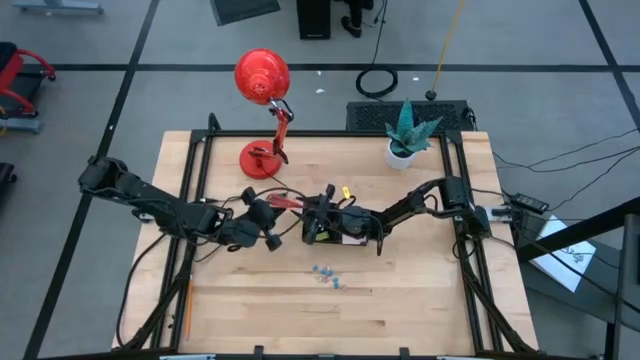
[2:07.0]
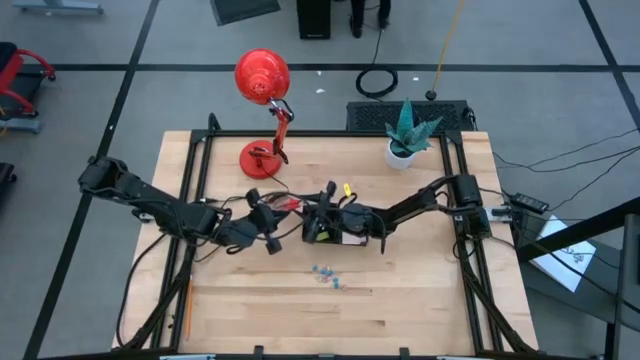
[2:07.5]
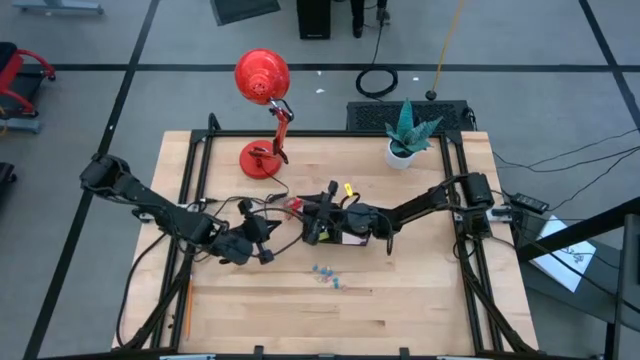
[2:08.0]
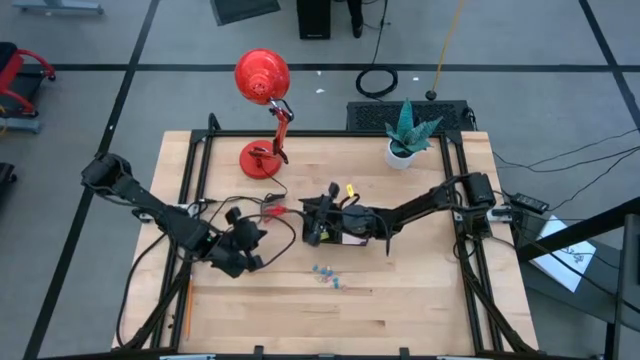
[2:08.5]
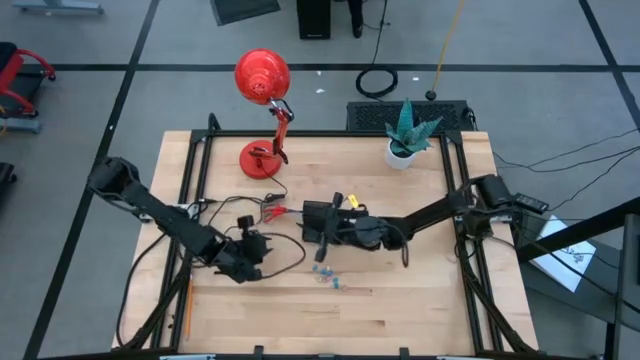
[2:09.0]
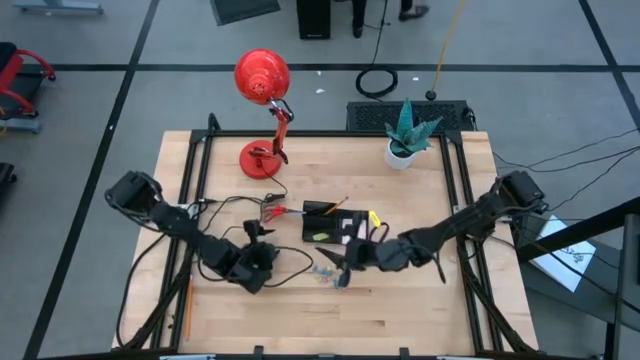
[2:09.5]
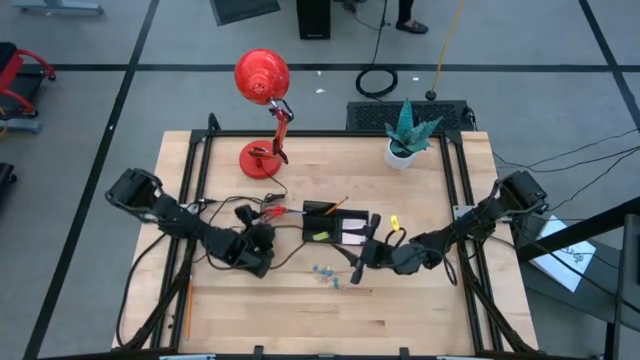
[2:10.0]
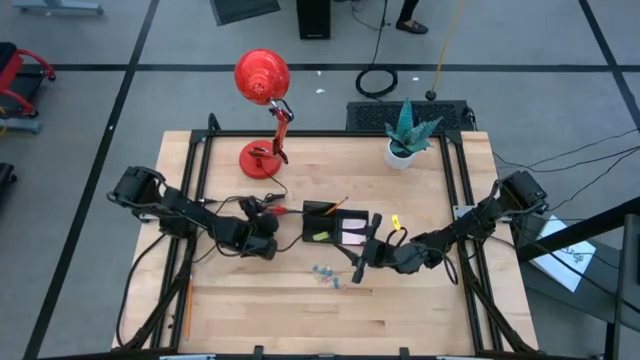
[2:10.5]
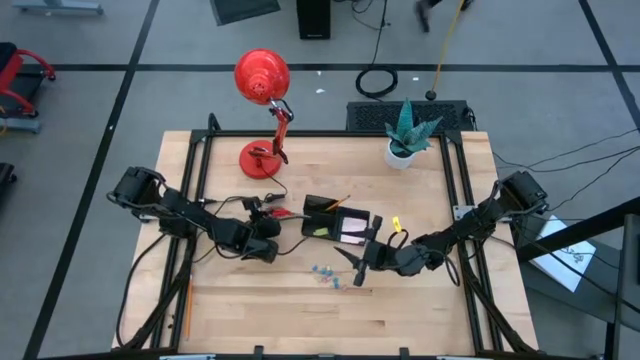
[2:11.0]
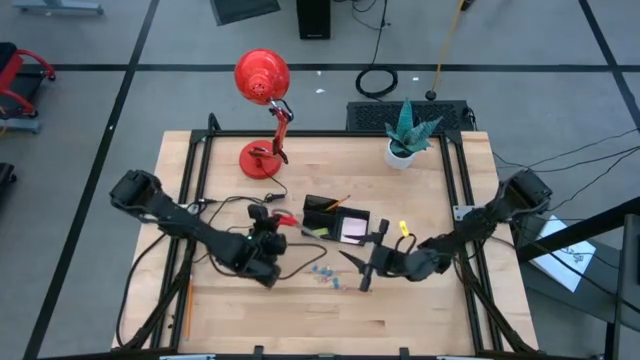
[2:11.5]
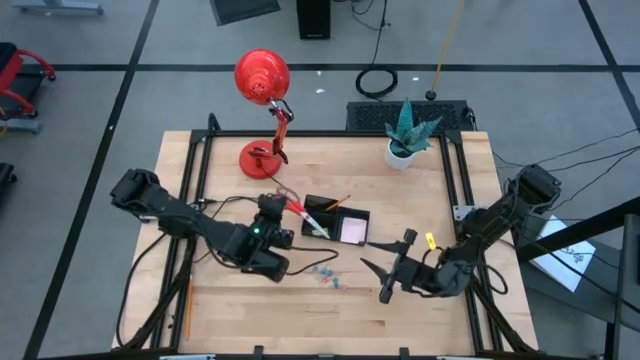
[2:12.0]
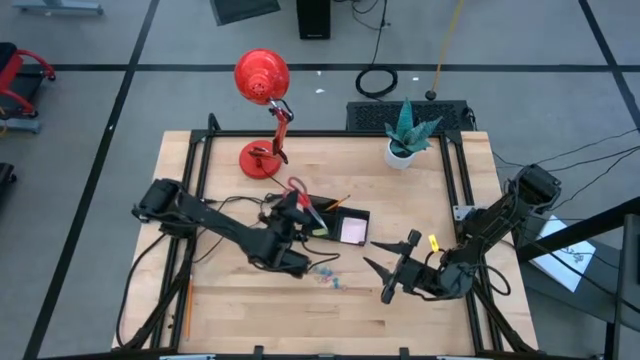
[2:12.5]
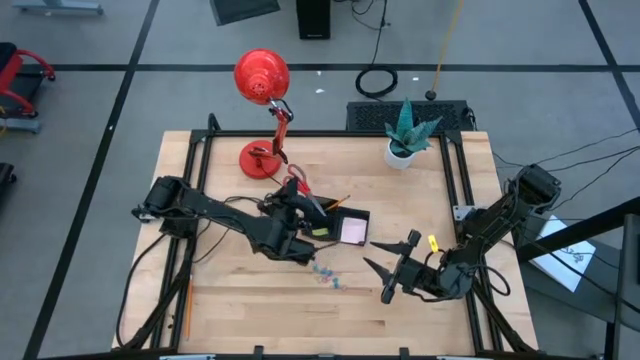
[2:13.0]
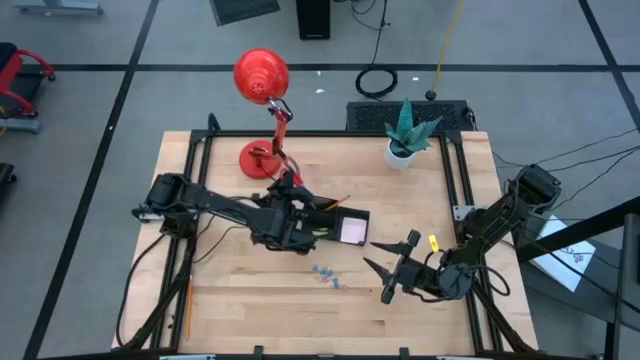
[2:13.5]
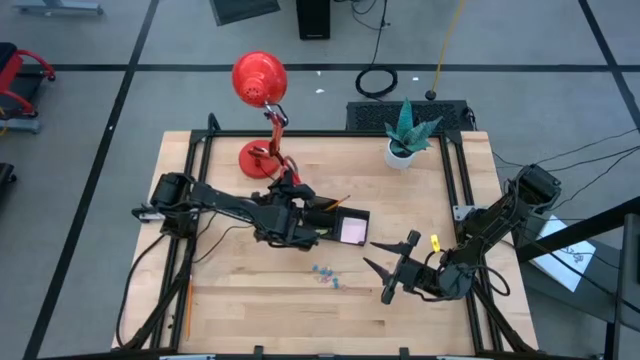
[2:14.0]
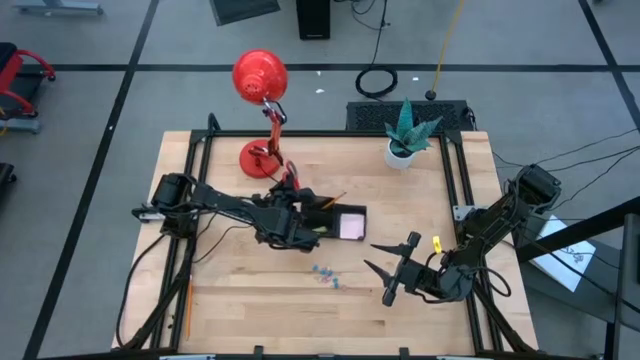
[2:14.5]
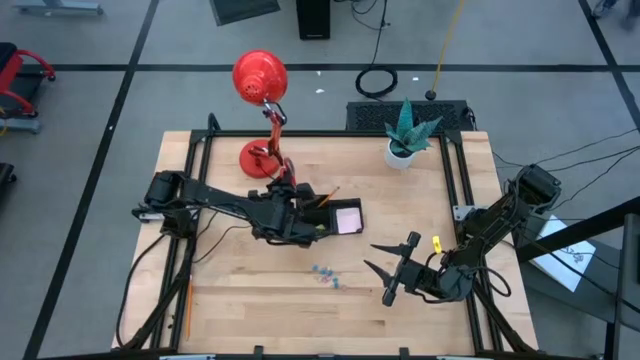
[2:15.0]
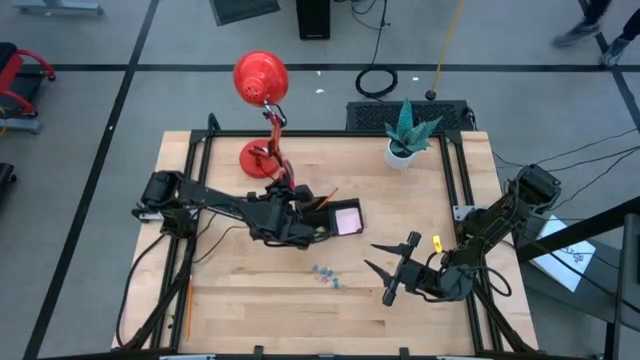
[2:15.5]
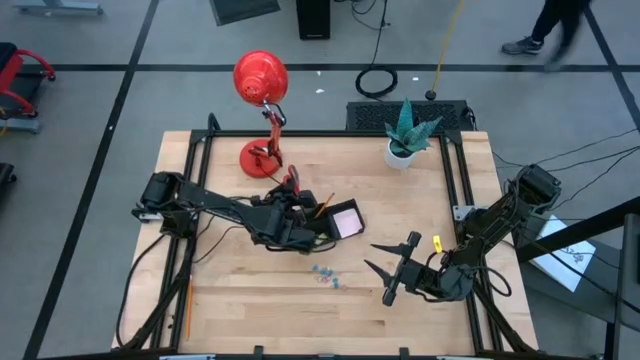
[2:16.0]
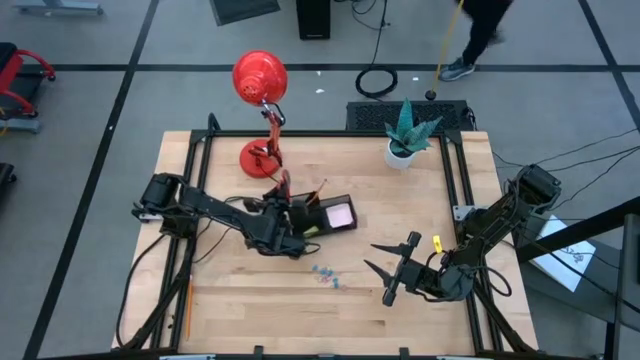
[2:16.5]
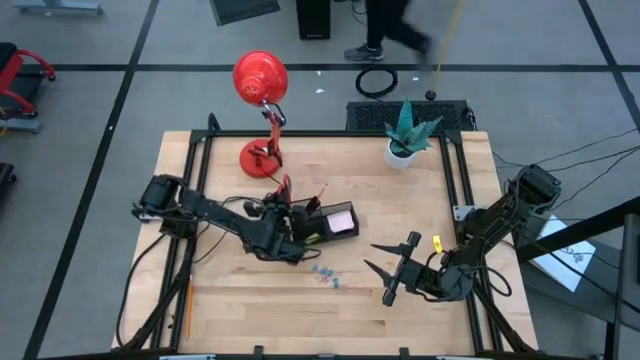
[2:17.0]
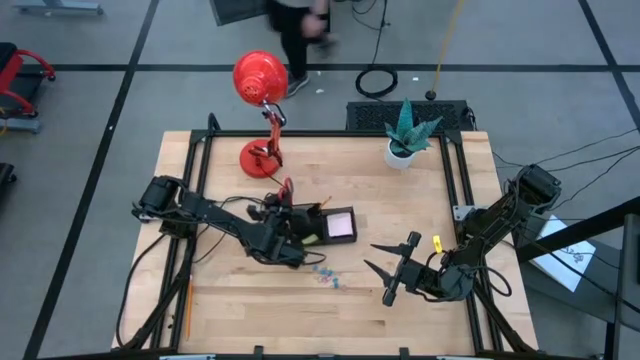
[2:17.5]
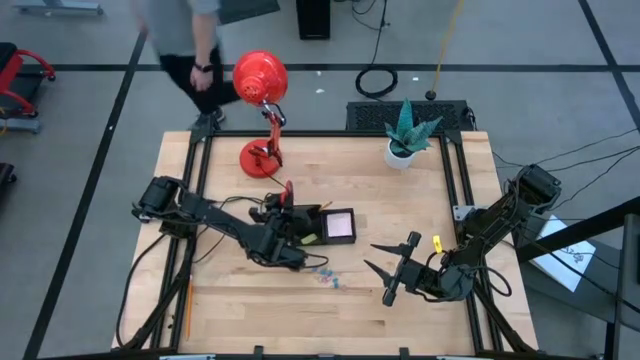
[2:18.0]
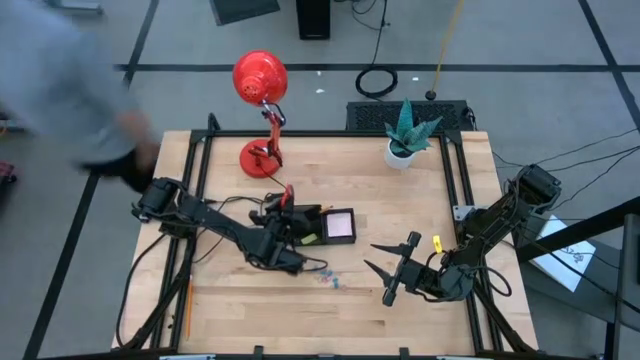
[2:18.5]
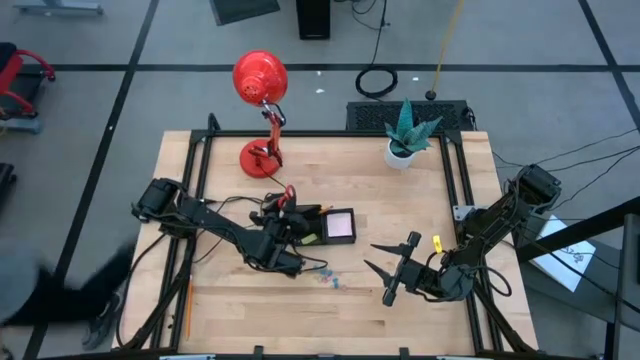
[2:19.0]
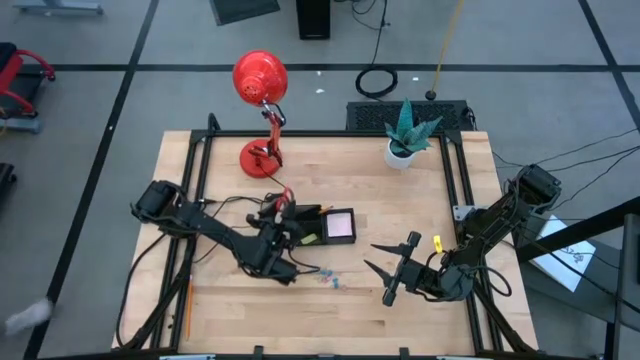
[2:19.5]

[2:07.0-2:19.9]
Task: Pick and place office supplies into organizer
Put the red scissors into the black desk organizer

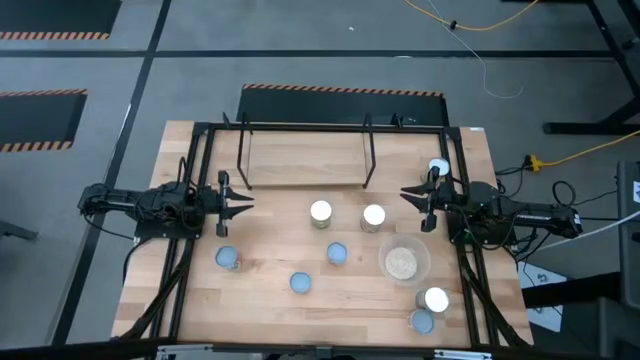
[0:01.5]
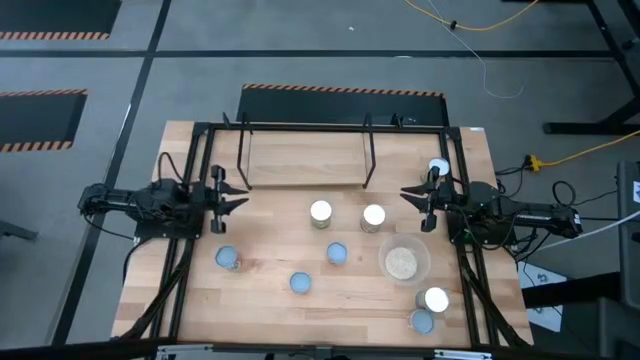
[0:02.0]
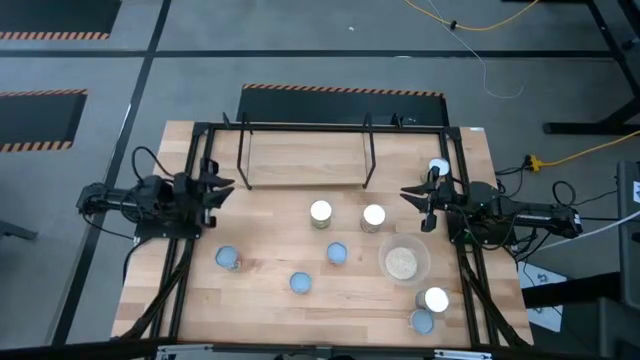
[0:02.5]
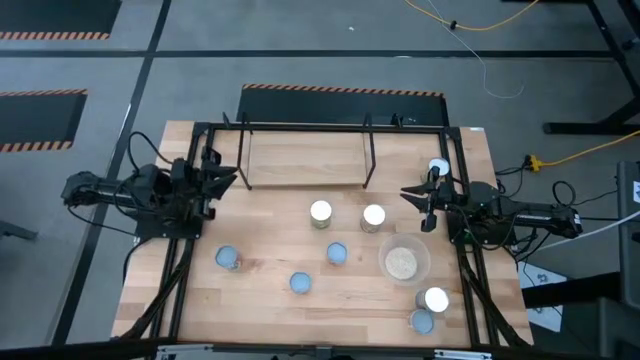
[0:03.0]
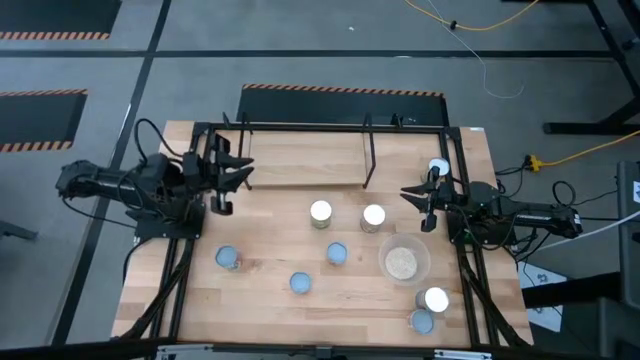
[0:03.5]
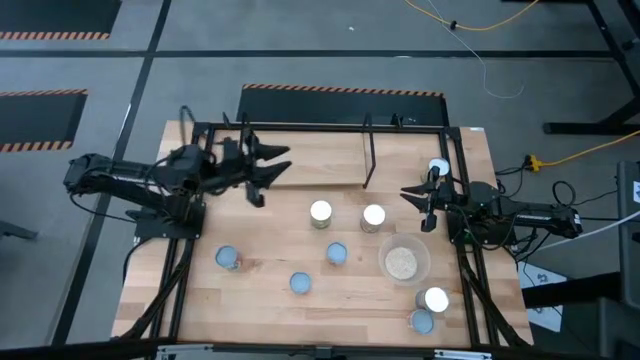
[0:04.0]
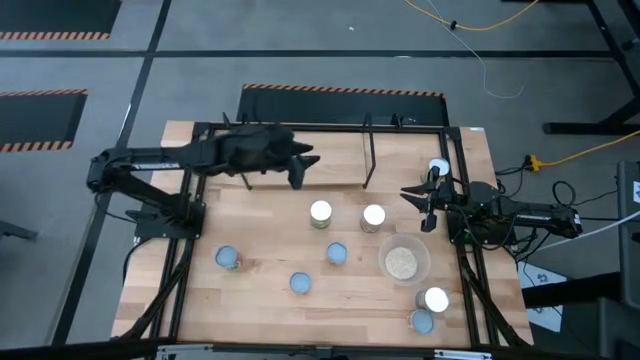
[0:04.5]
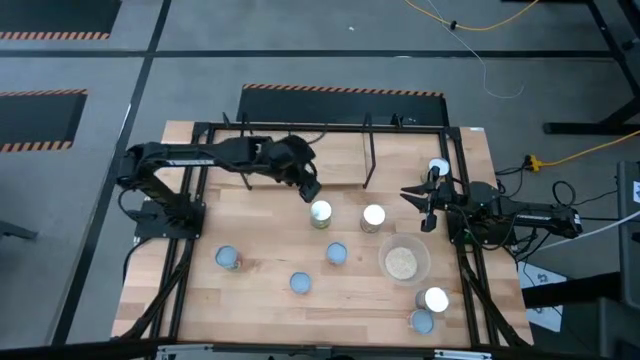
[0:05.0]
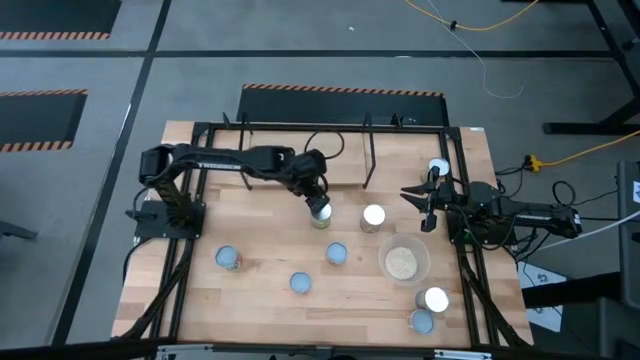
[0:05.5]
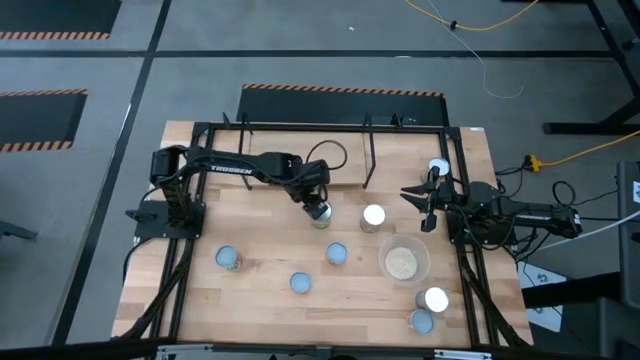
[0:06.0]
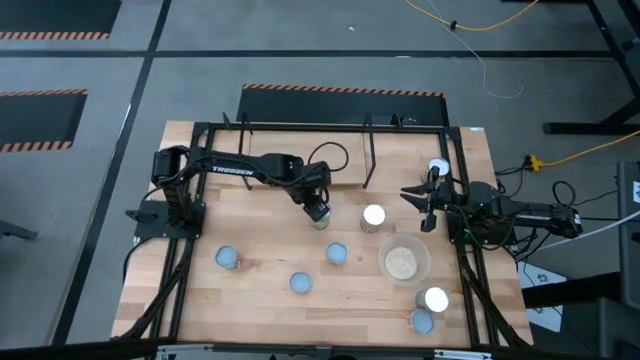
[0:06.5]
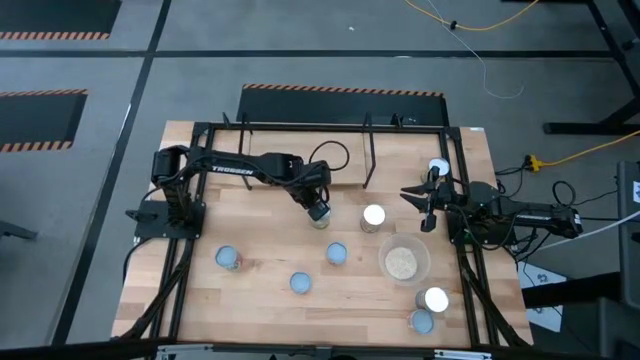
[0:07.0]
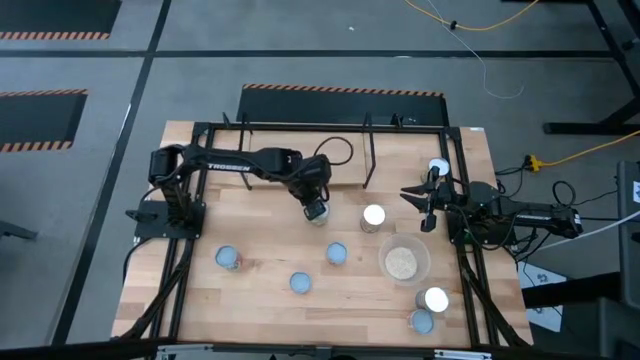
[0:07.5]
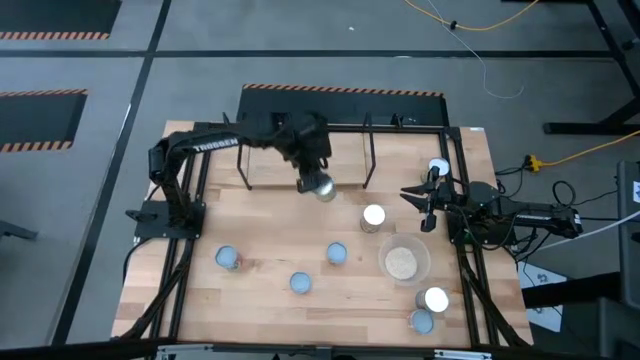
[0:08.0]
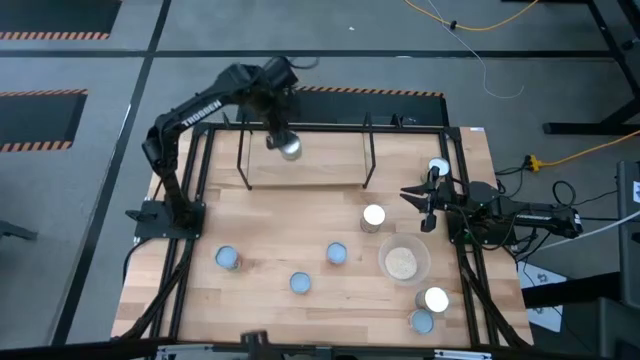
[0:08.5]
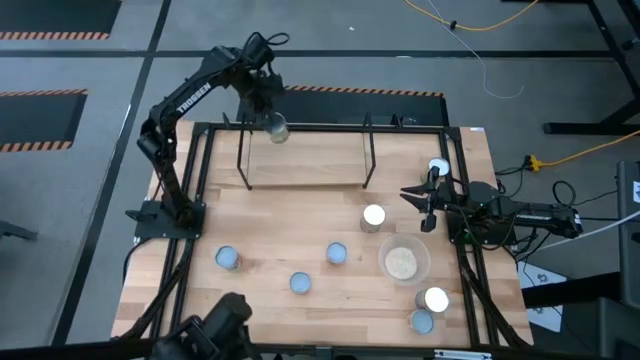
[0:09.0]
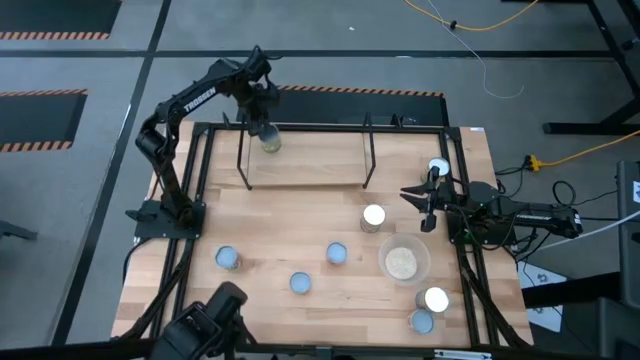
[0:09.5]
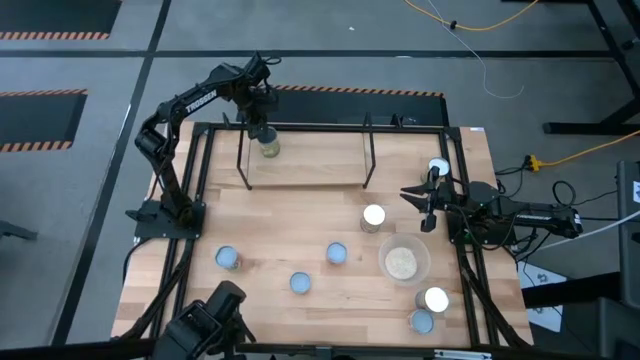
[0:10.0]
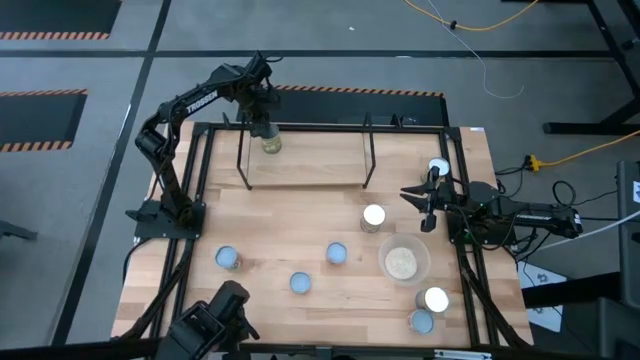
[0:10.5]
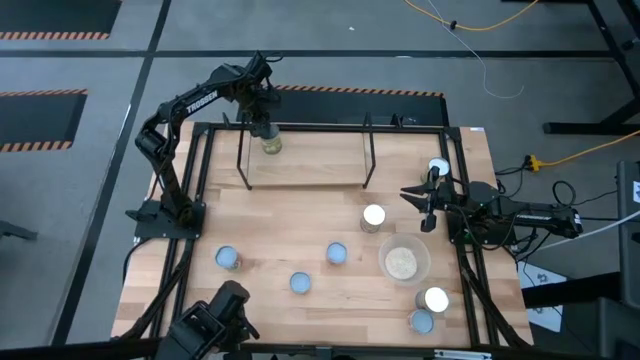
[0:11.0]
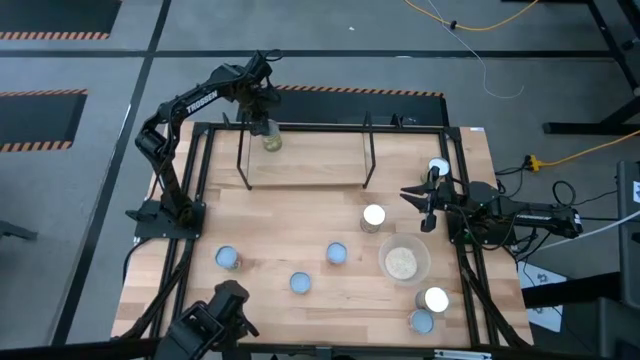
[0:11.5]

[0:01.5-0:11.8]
Task: Pick and place cans onto a shelf
Put the canned pears on the shelf
